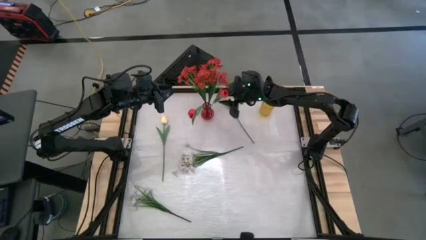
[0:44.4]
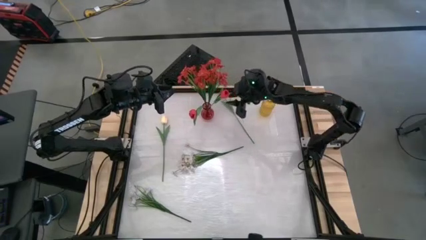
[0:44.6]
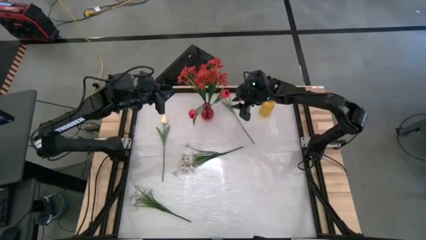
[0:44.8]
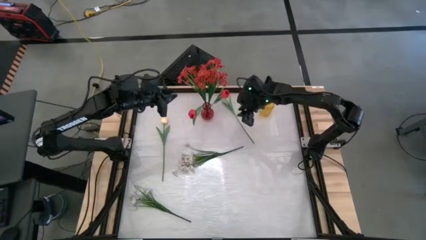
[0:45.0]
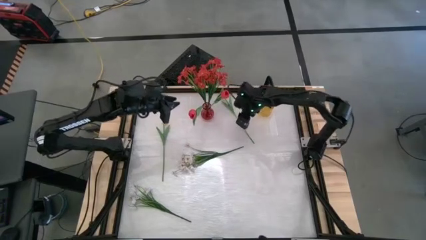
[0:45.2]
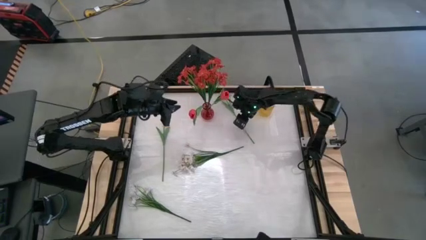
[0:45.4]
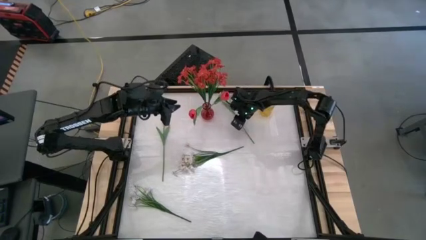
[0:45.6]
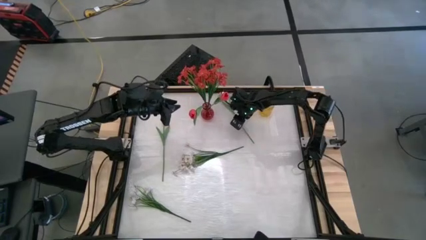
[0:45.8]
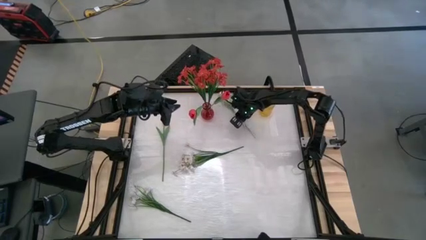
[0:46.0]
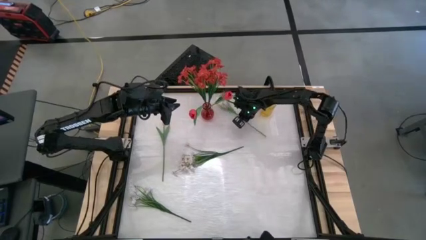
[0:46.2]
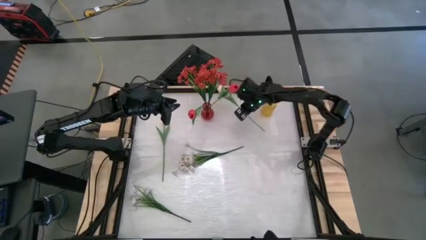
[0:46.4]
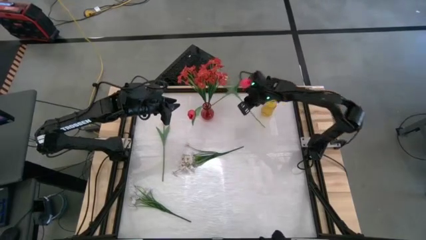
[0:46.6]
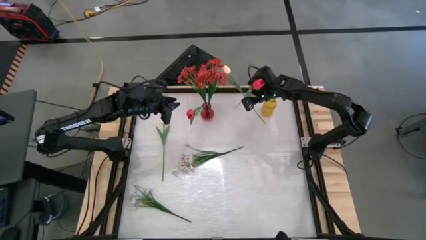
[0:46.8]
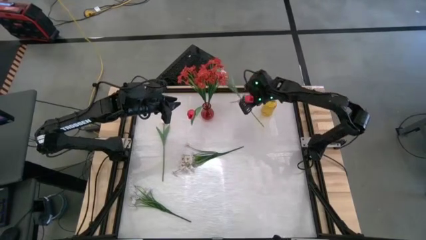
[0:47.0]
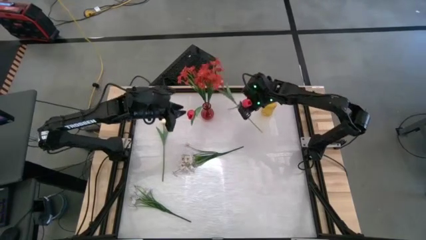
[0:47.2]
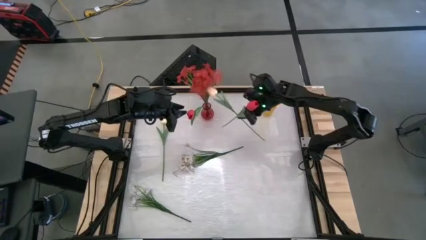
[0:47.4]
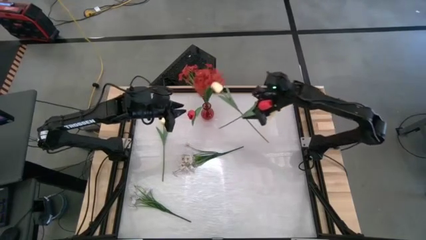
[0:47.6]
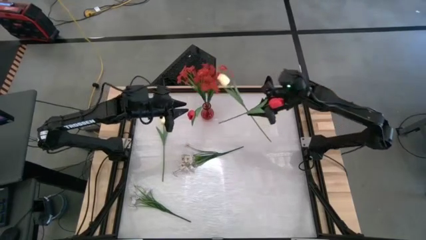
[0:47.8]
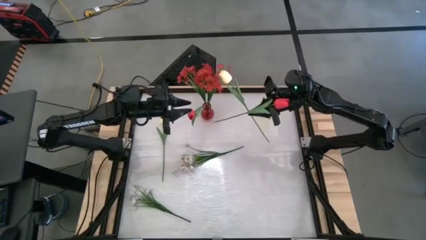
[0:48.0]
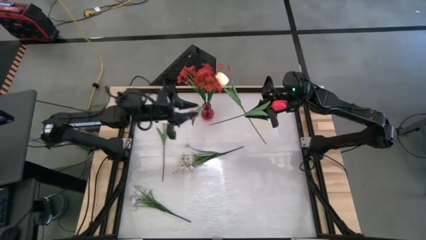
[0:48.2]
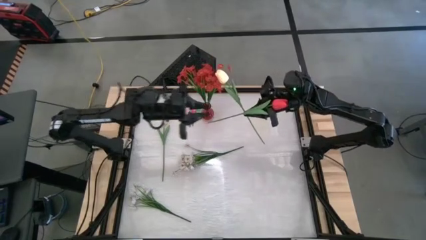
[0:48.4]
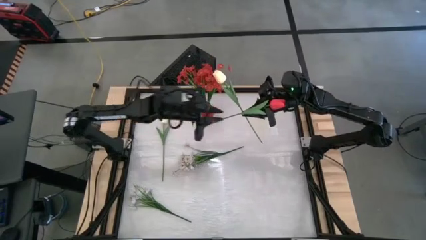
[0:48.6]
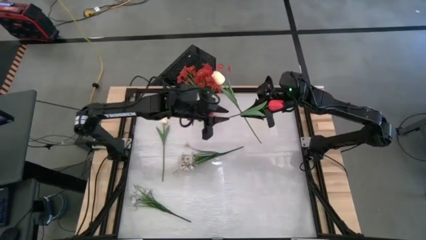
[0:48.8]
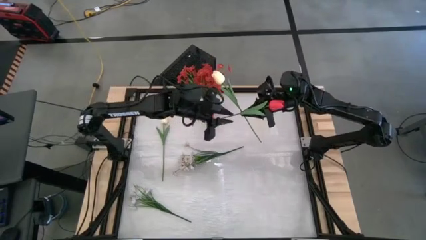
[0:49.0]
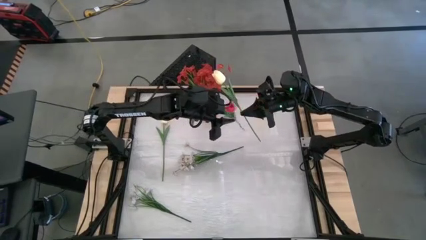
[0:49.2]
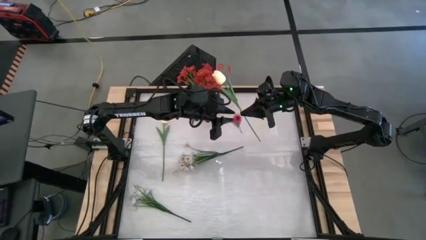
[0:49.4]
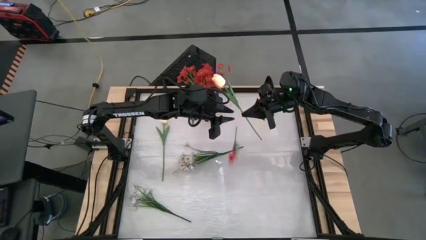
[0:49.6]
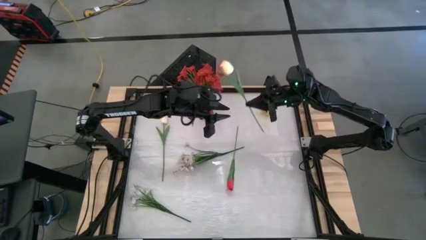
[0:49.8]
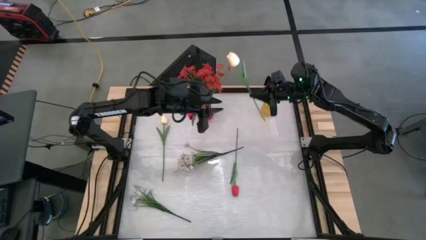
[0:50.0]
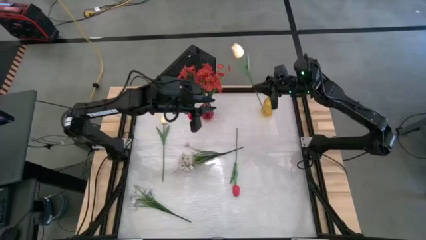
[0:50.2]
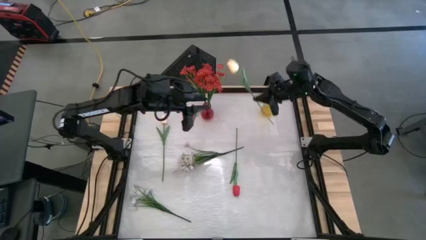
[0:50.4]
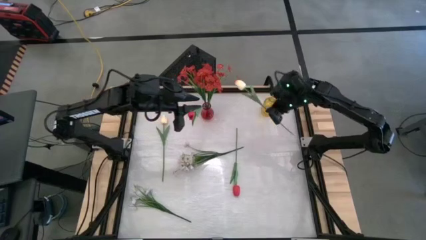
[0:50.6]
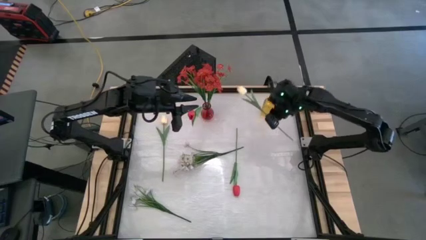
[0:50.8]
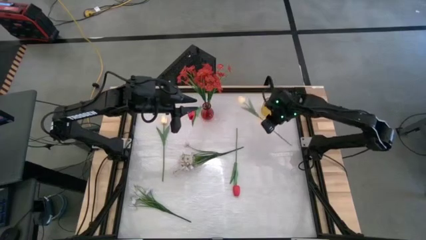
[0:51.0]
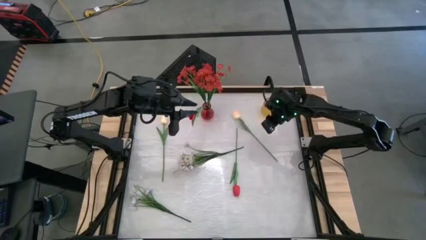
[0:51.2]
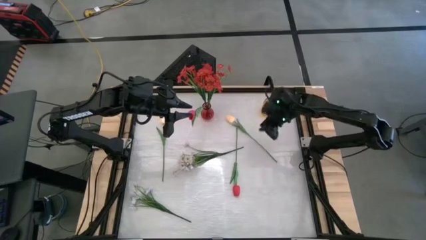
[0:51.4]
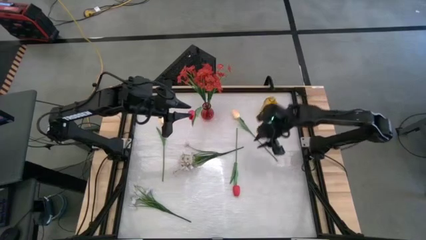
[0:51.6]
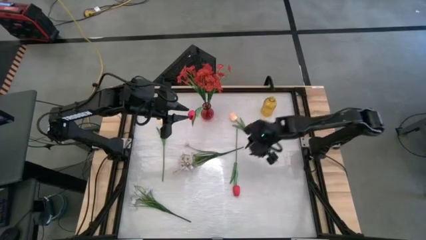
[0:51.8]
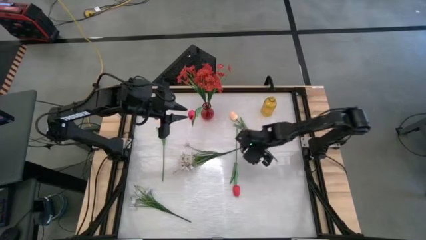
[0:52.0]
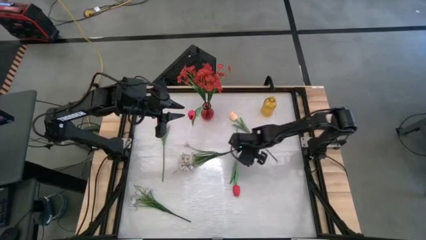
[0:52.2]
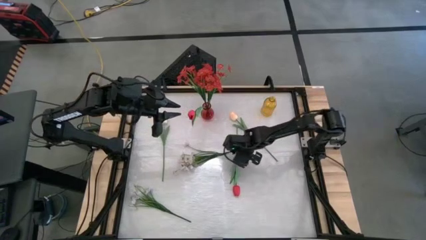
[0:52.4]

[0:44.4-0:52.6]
Task: Sort flowers into vase by color
Put the white flower into the yellow vase

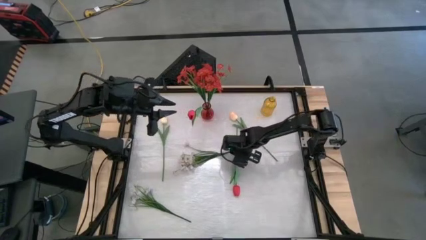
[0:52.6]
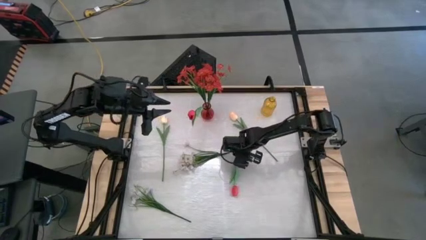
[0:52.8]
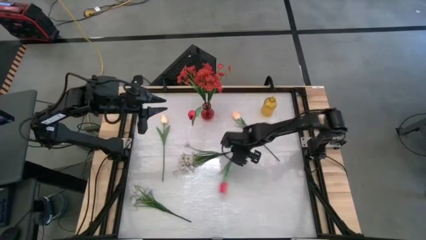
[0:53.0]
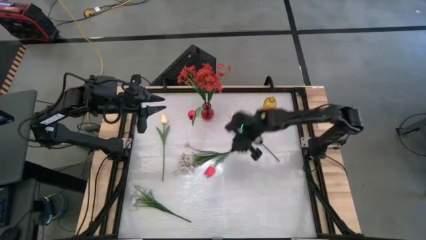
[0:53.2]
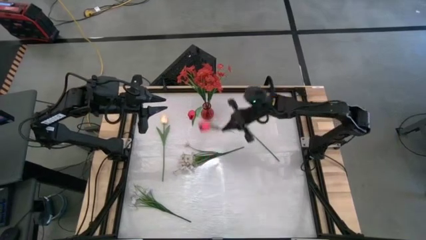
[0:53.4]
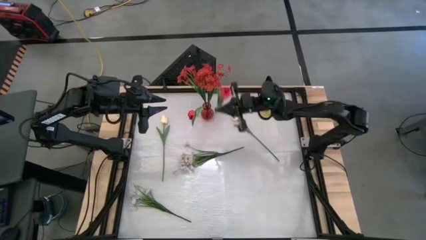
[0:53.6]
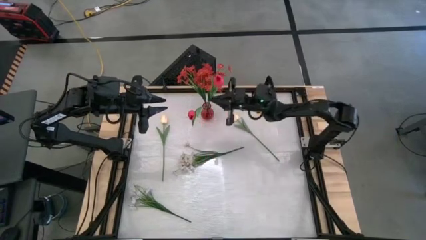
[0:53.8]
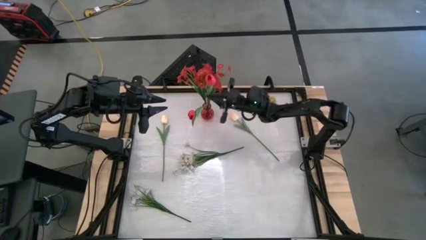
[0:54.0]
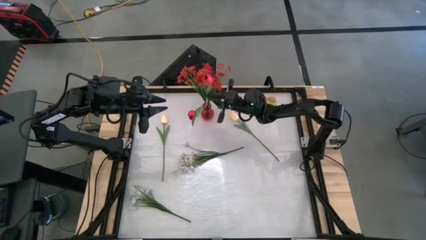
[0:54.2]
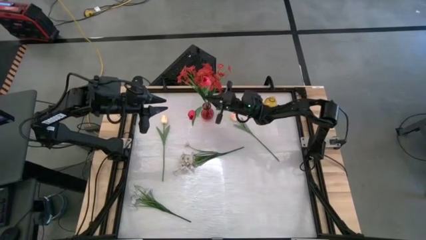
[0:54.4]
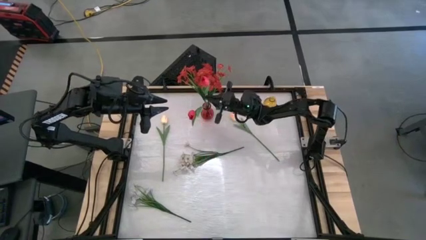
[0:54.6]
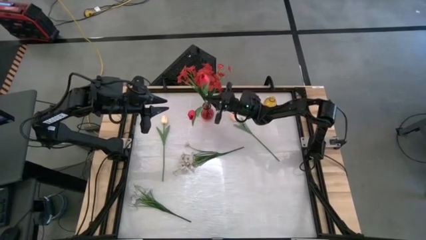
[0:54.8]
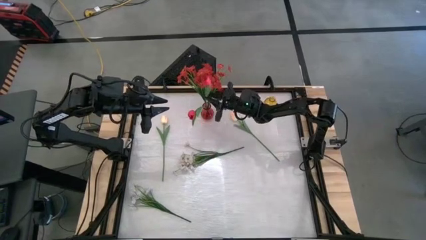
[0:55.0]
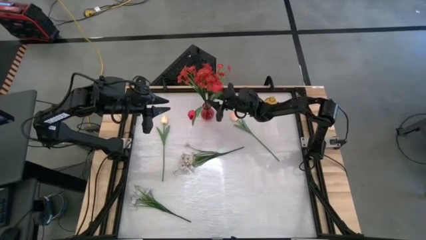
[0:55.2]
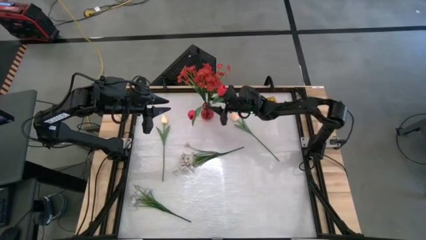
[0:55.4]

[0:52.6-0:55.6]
Put the pink flower into the red vase

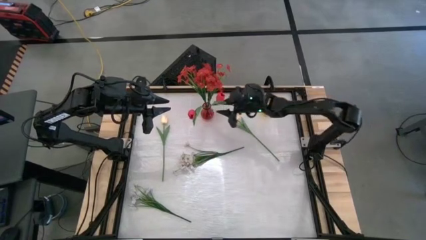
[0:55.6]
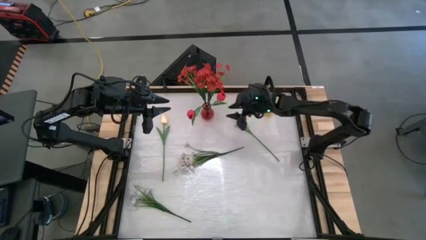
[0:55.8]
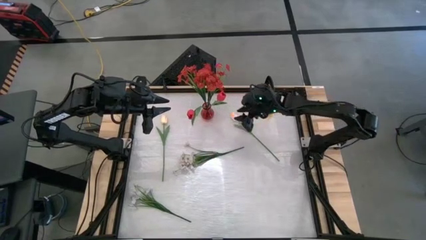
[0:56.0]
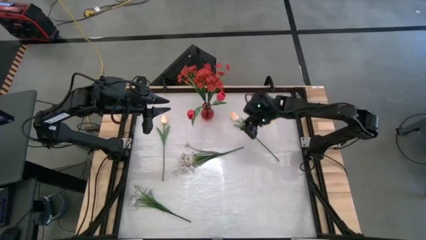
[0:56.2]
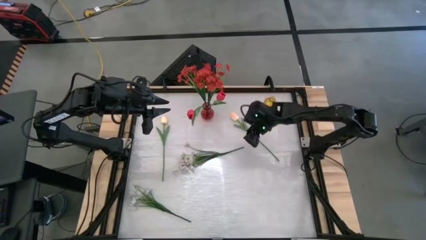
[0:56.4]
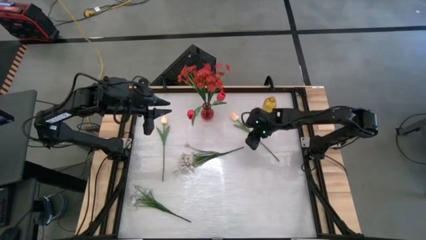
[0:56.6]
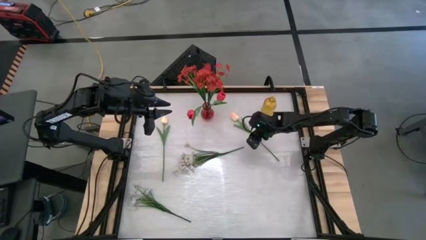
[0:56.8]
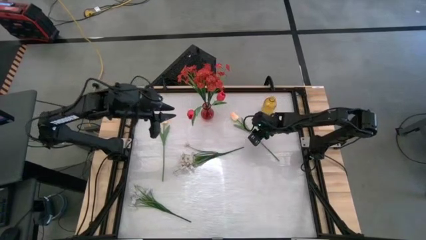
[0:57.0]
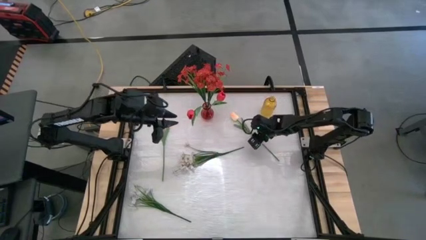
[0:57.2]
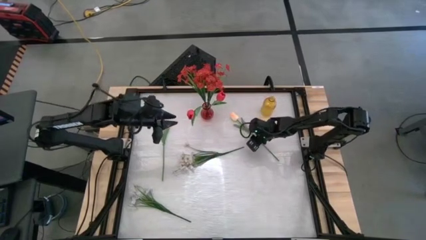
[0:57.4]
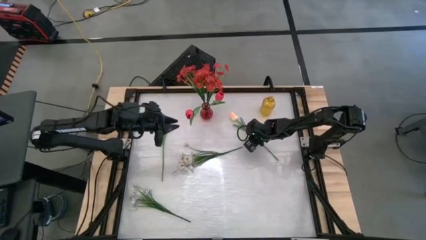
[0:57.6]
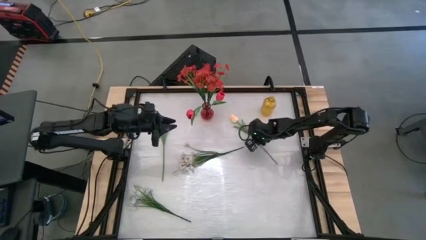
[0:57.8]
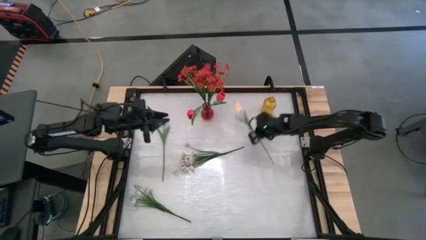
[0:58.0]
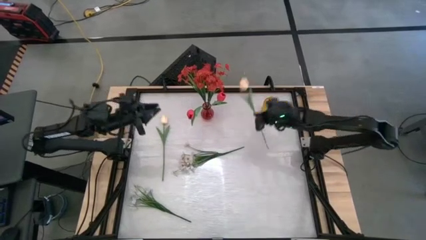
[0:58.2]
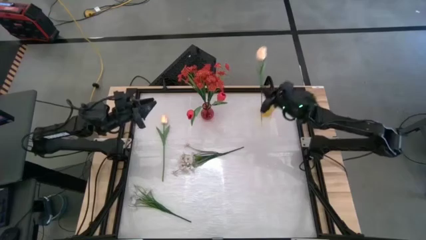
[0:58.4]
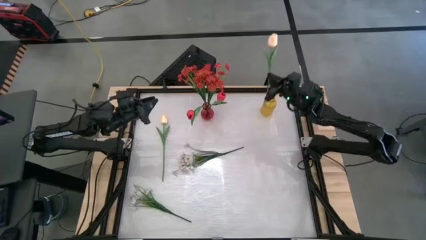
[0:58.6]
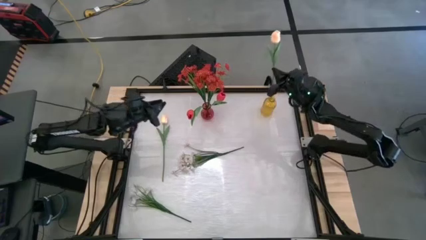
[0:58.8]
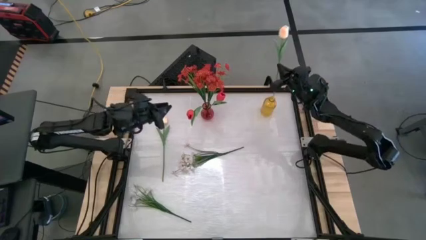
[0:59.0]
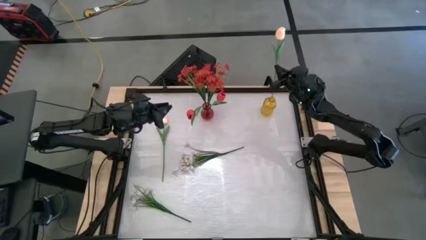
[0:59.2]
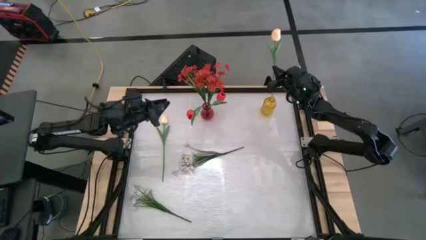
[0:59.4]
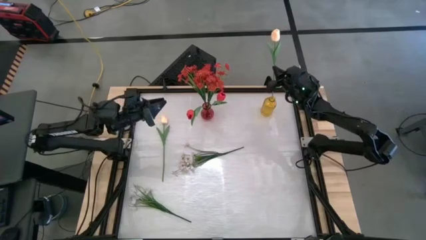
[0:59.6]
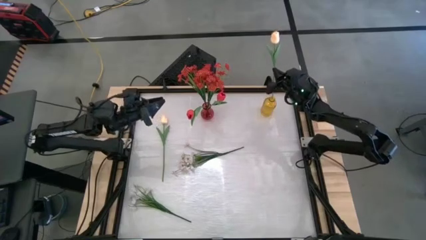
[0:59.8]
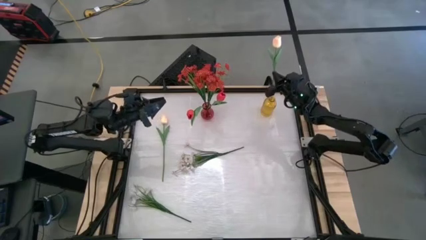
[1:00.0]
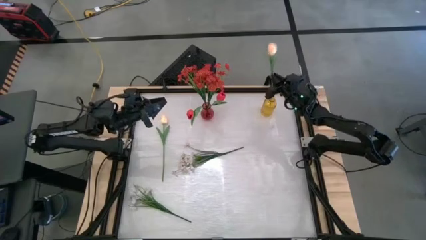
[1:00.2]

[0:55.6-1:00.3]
Put the right white flower into the yellow vase
